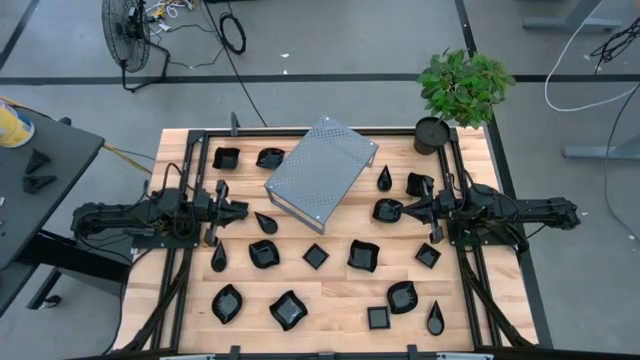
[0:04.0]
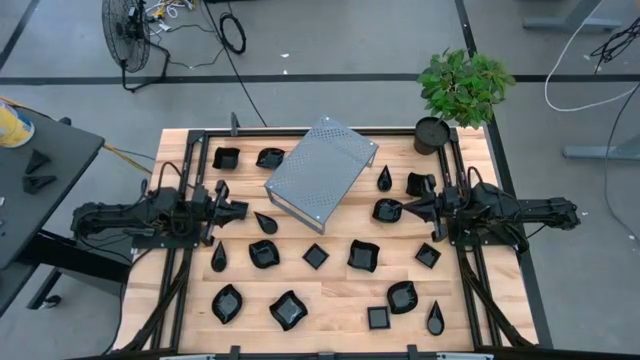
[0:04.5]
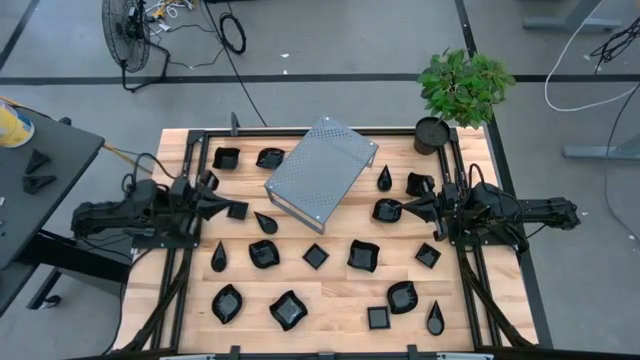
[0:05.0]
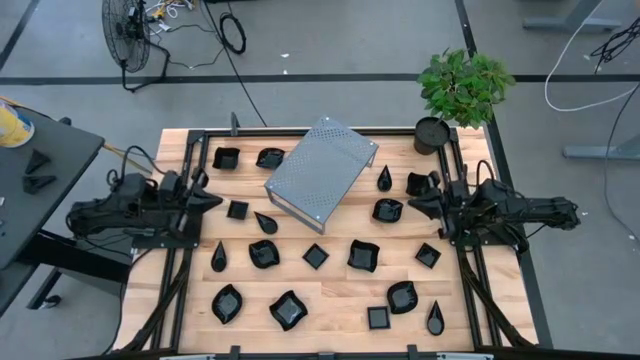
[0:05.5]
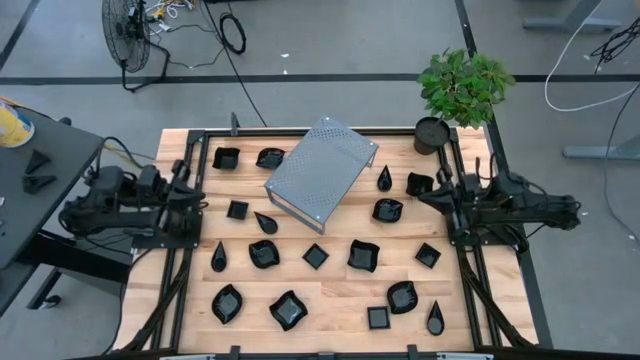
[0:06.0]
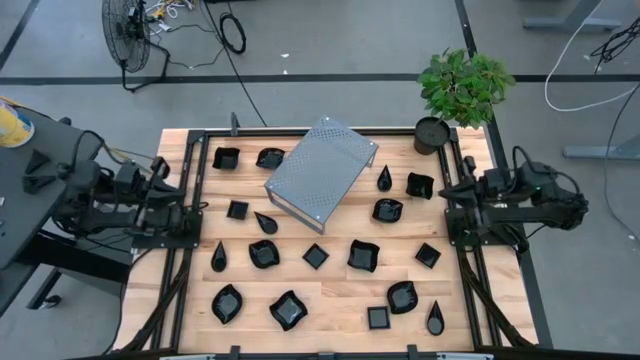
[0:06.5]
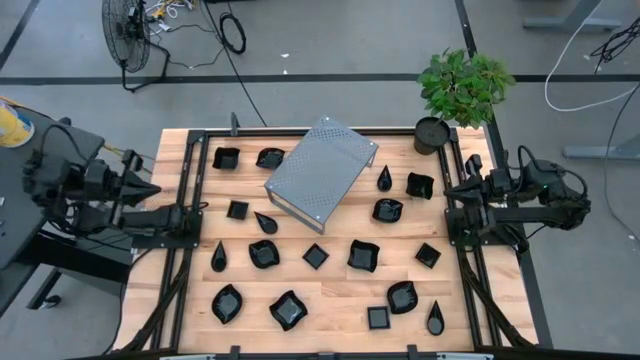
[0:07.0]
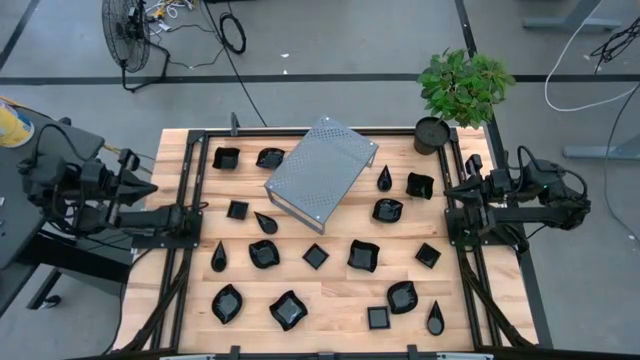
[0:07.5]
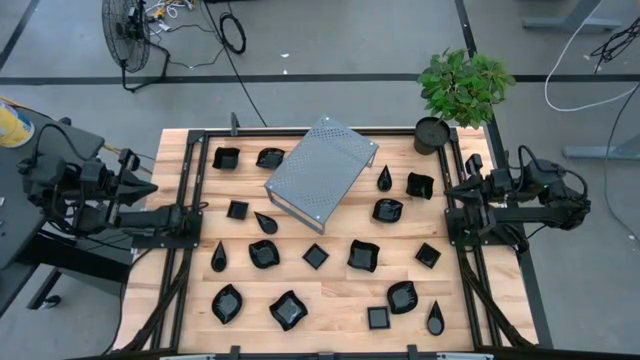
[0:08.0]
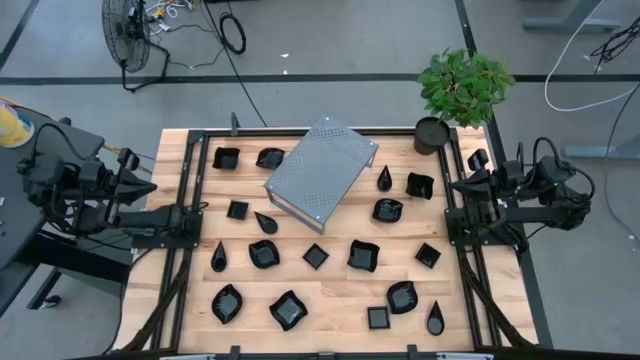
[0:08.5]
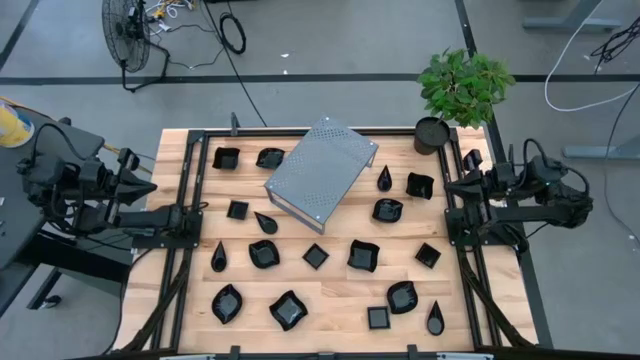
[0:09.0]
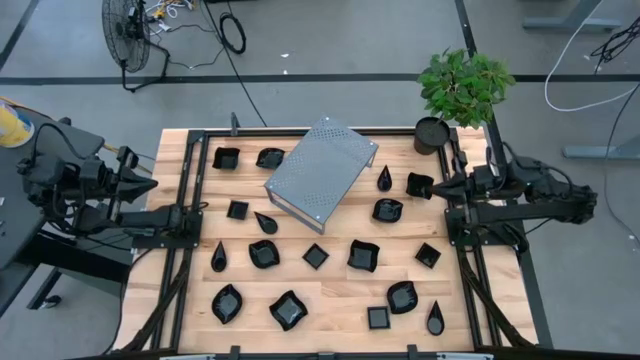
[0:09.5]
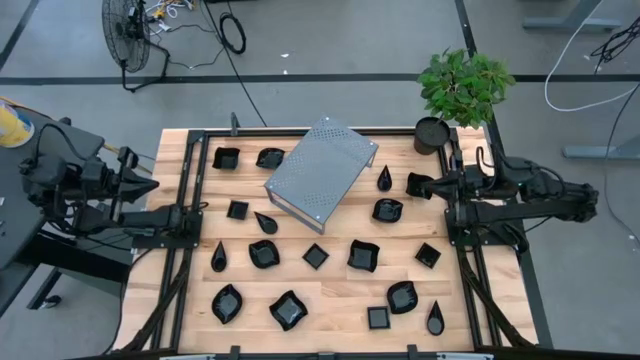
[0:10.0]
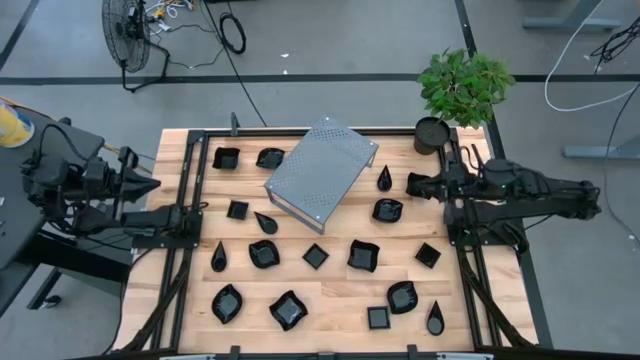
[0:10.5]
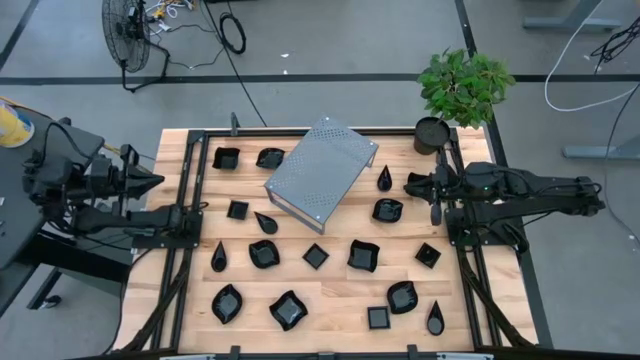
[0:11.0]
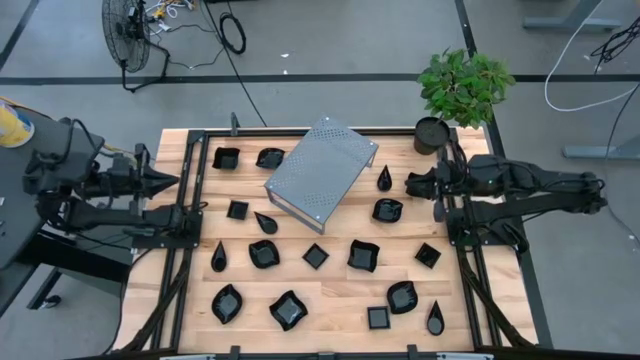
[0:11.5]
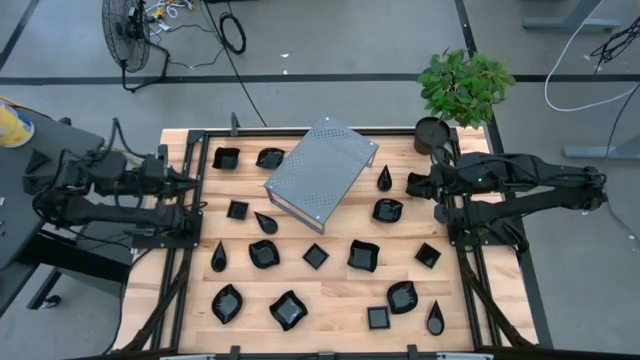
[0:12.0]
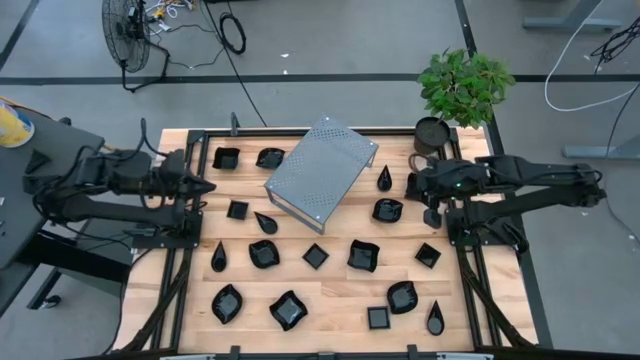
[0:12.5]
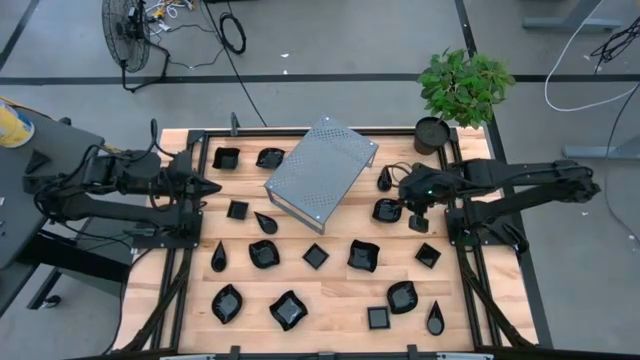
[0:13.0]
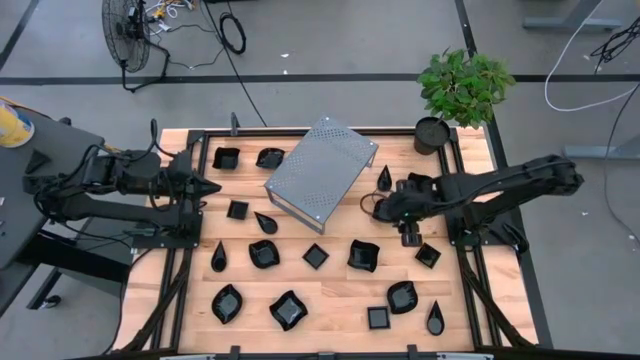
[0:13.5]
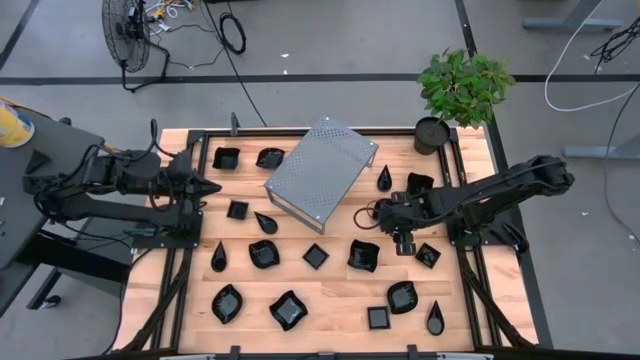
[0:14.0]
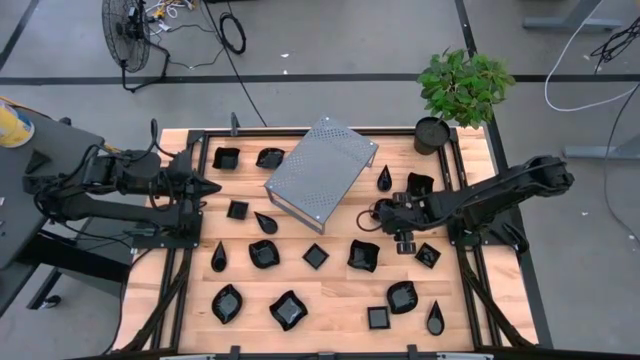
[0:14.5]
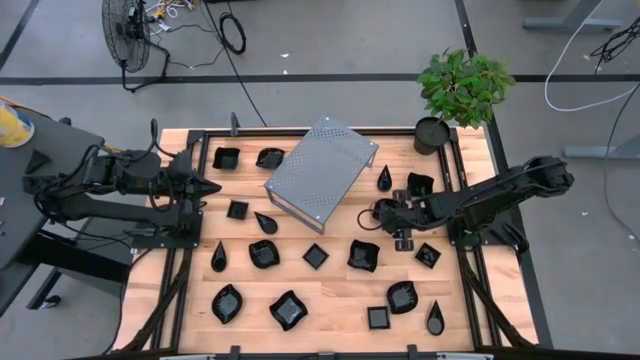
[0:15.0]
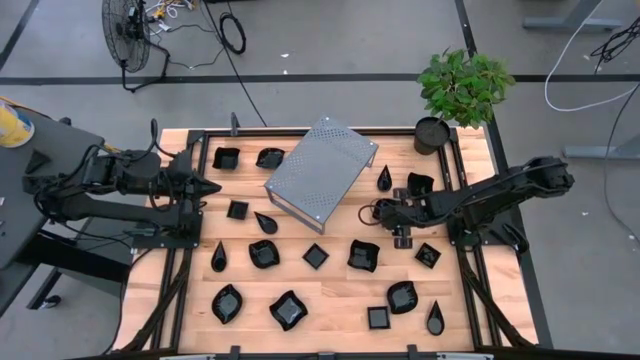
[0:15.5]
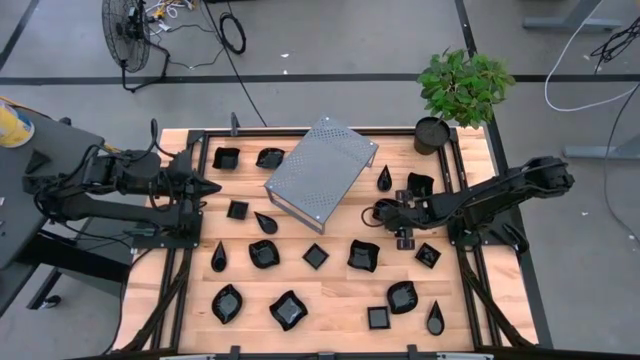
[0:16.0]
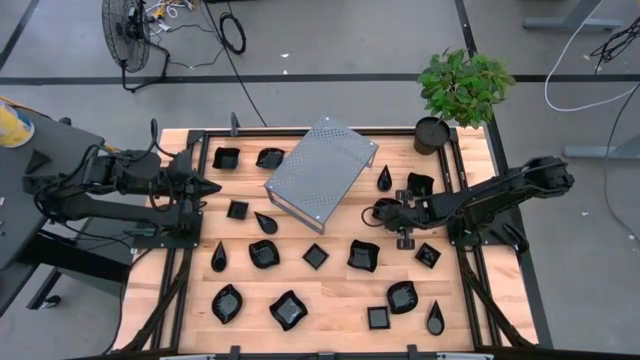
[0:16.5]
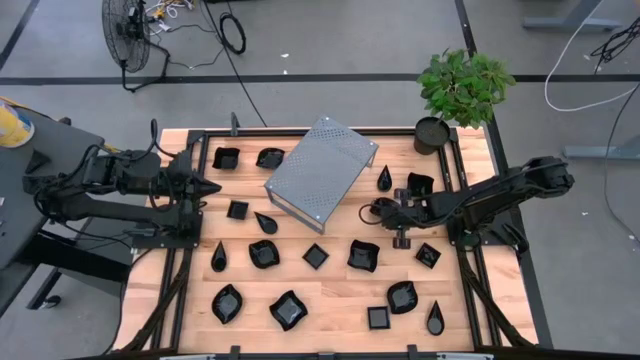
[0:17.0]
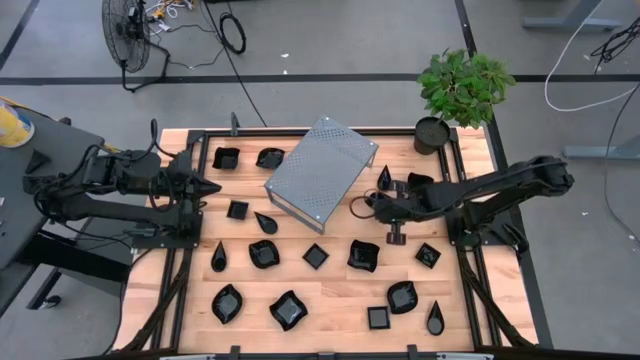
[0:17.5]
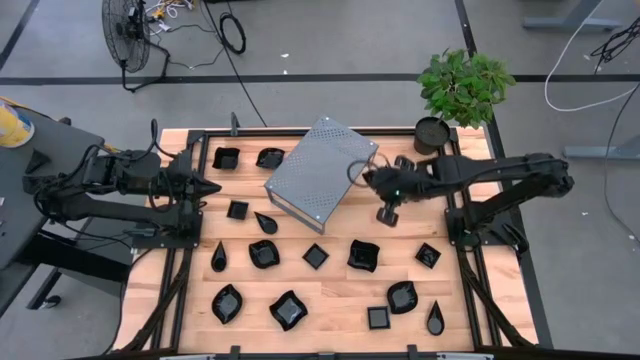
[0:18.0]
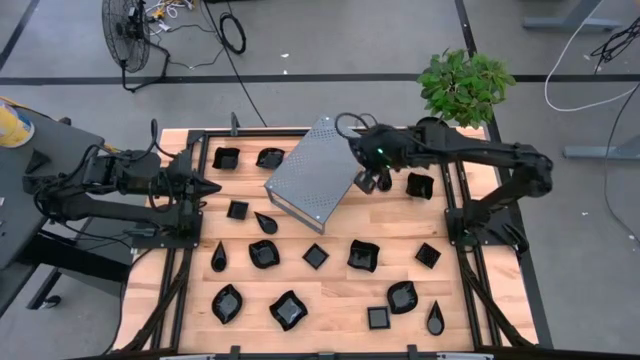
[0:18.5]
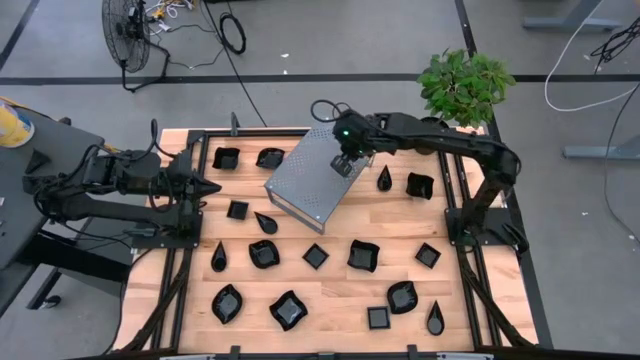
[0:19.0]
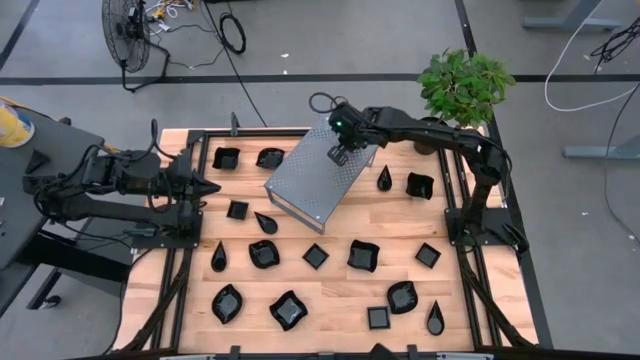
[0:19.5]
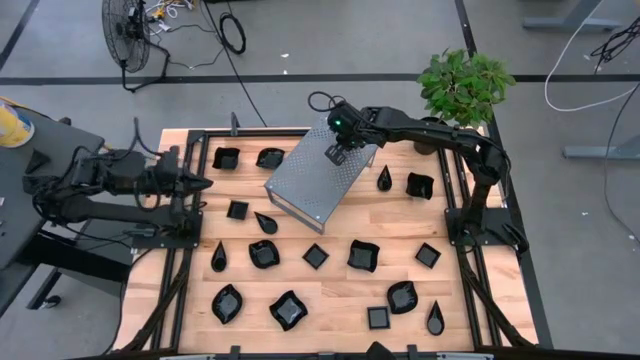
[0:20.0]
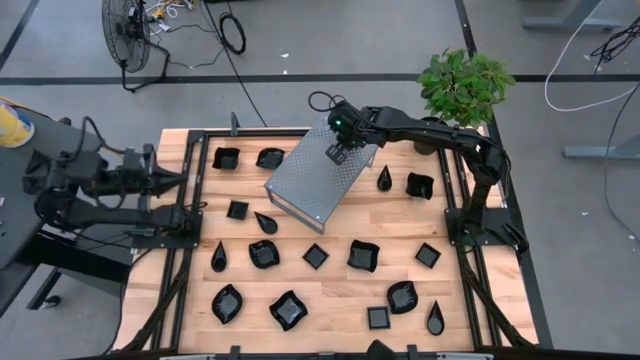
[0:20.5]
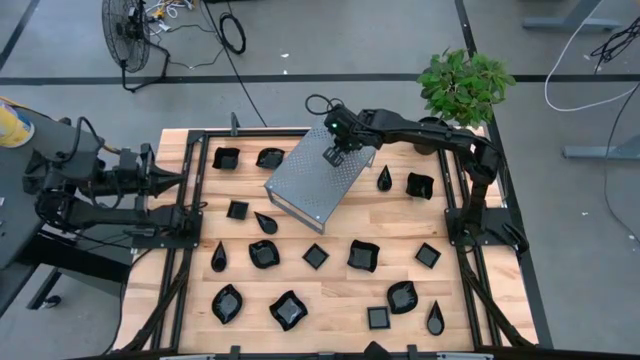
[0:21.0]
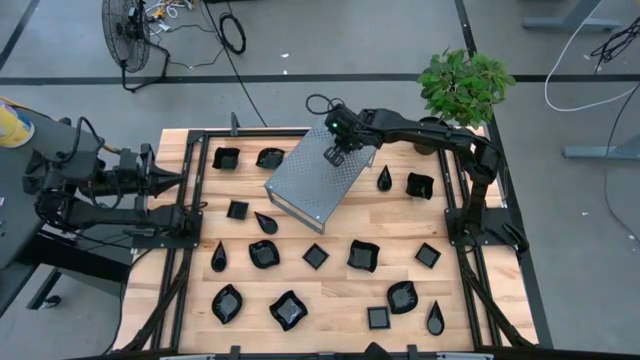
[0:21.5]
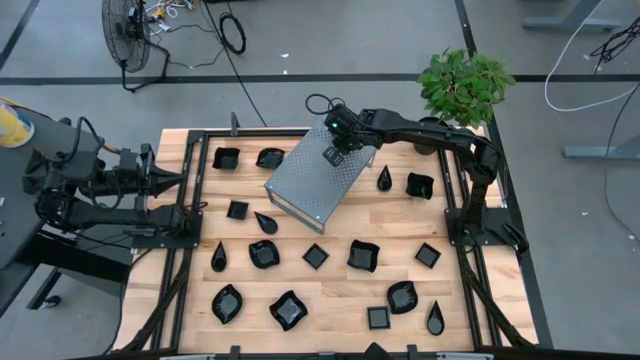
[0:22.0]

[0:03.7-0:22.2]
Task: Pick & Place Mini shaped plates
Put the black leaf shaped plate on the shelf

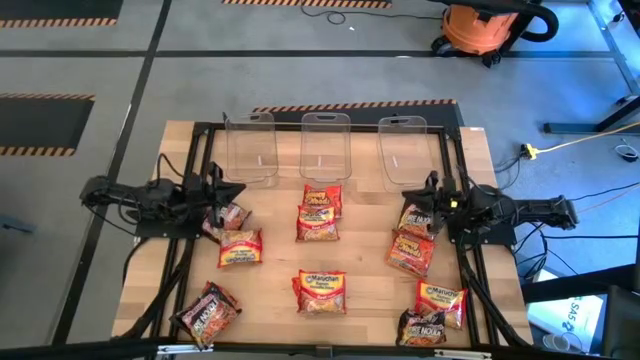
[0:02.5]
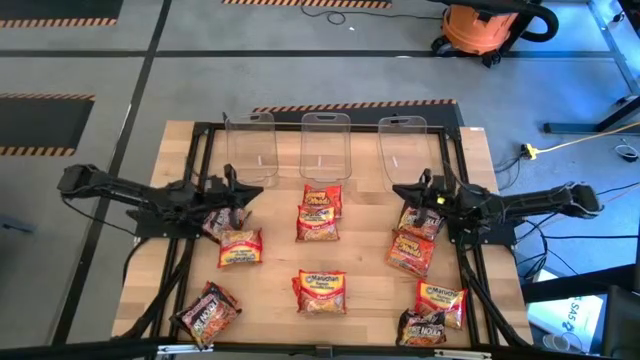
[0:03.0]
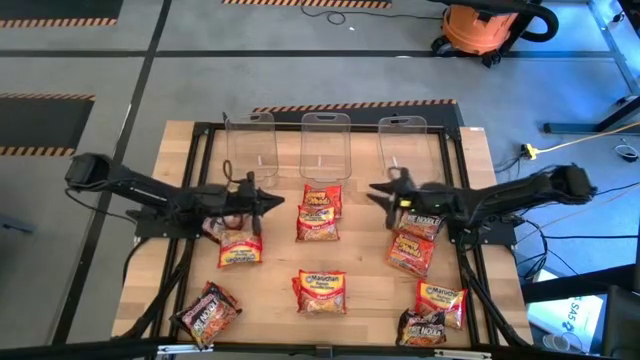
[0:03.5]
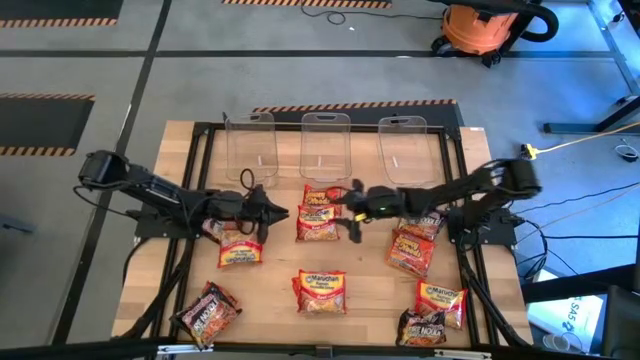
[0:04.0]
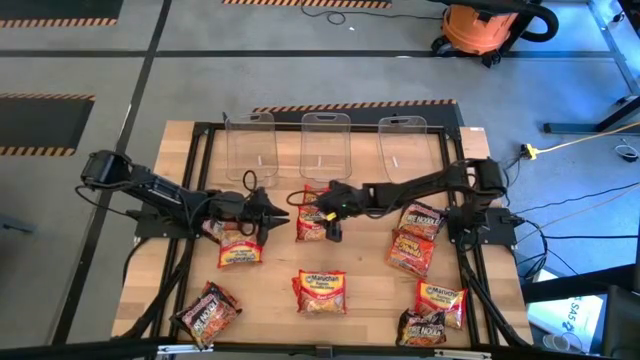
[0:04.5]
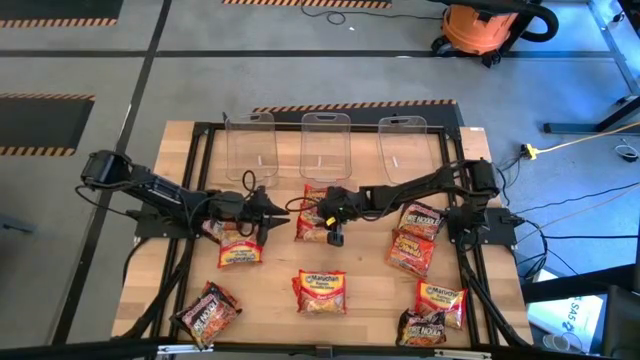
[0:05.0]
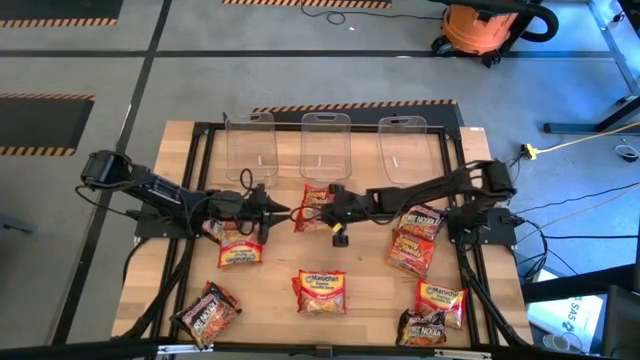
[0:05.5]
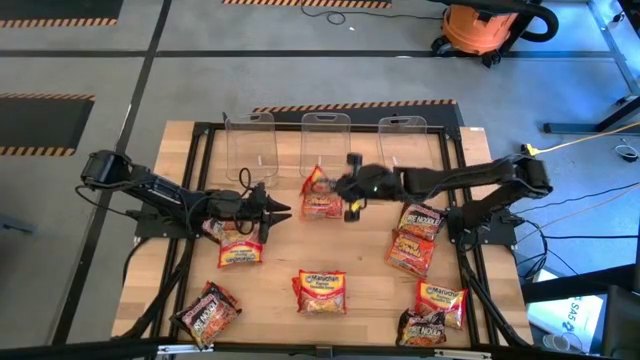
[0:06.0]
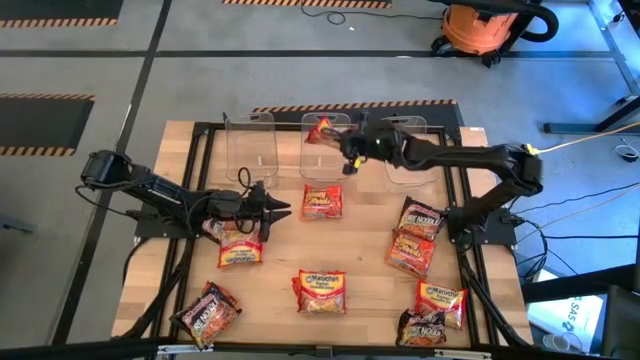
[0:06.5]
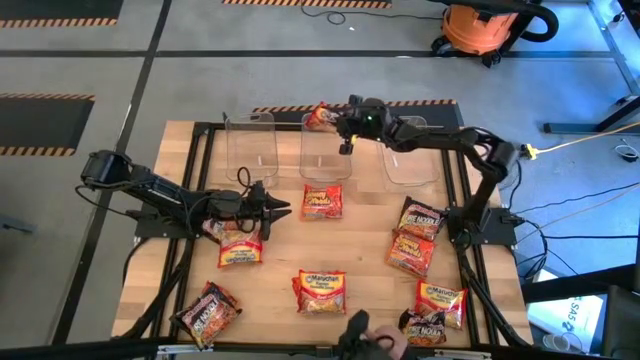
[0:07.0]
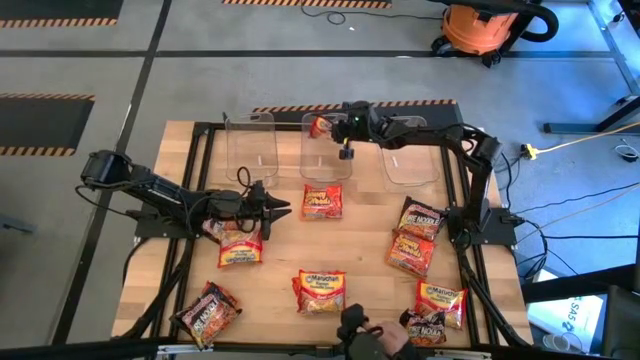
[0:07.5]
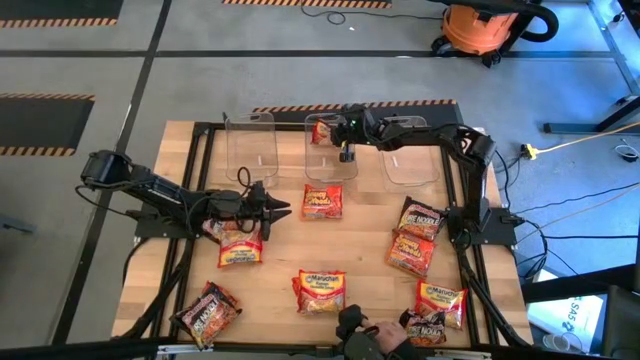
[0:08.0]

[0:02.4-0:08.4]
Task: Sort Maruchan noodles
Put the red noodle pack into the middle transparent bin
